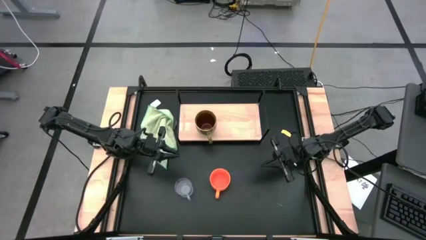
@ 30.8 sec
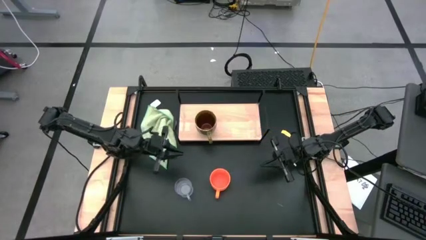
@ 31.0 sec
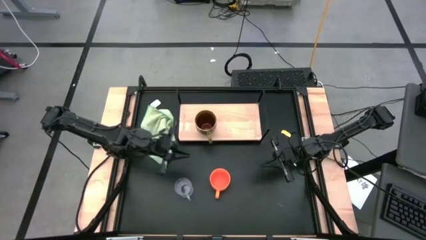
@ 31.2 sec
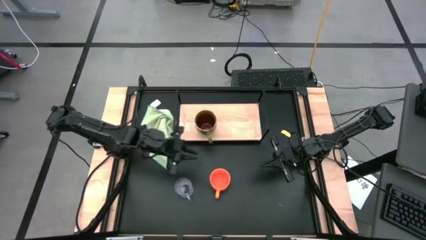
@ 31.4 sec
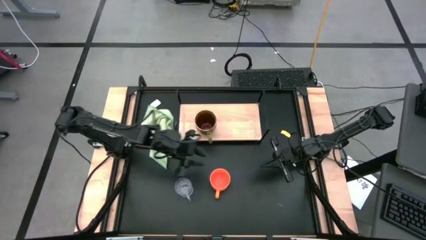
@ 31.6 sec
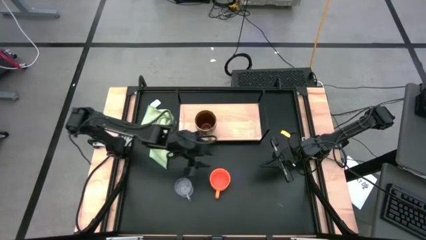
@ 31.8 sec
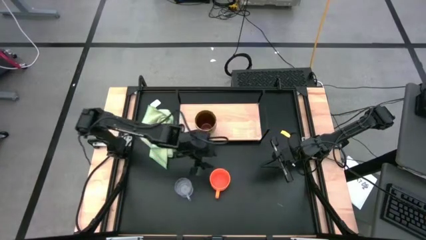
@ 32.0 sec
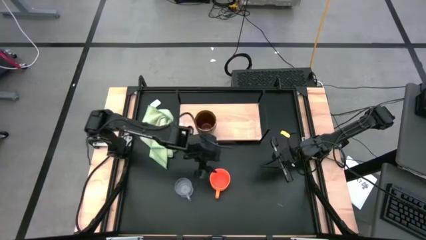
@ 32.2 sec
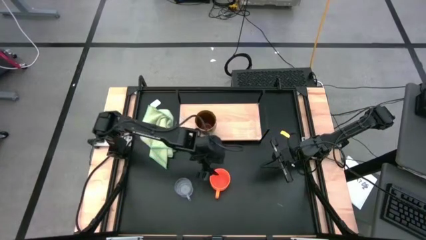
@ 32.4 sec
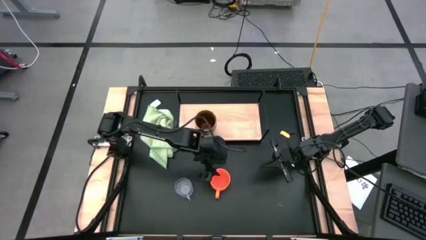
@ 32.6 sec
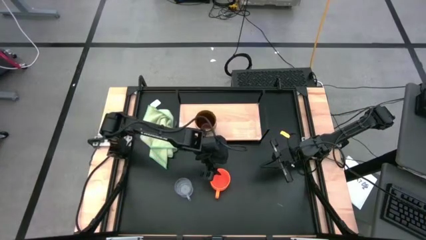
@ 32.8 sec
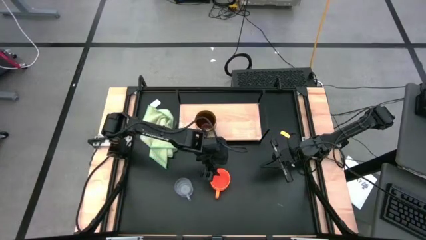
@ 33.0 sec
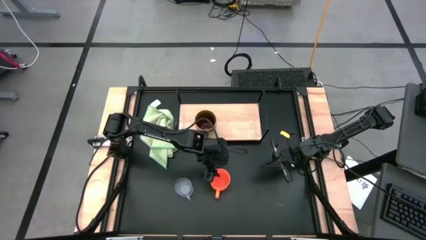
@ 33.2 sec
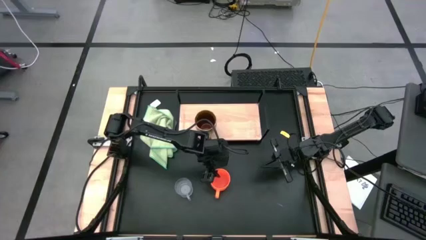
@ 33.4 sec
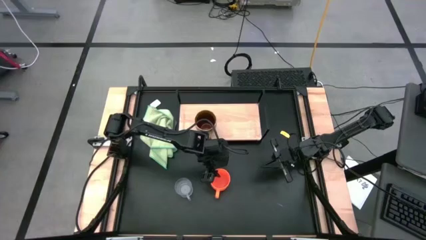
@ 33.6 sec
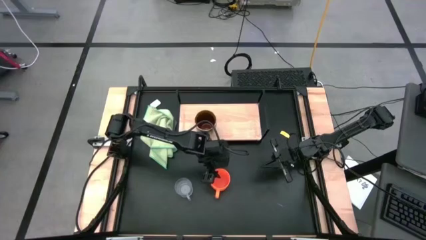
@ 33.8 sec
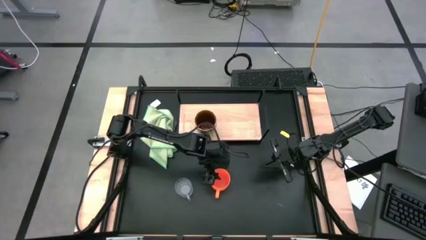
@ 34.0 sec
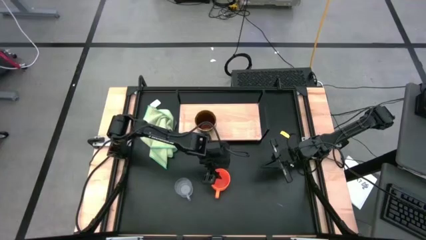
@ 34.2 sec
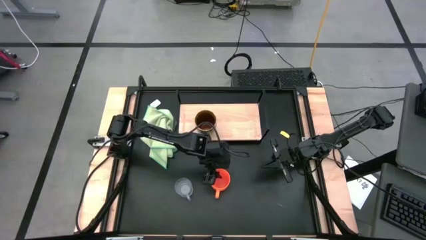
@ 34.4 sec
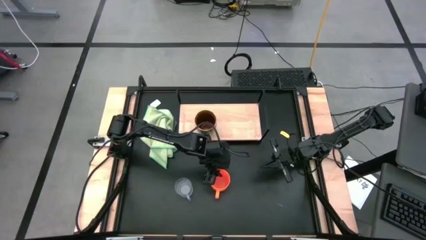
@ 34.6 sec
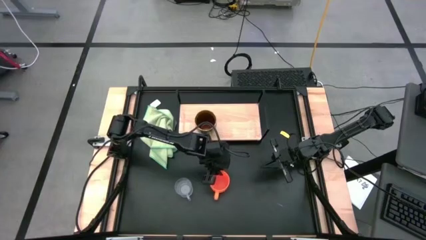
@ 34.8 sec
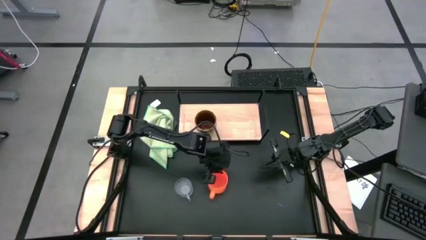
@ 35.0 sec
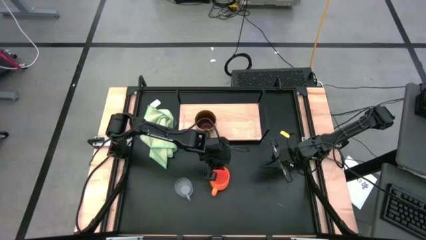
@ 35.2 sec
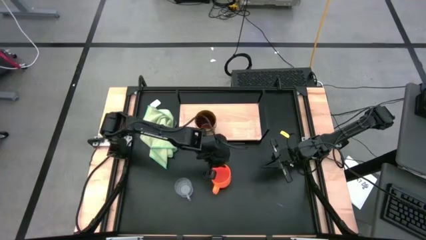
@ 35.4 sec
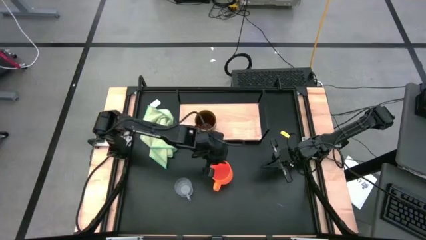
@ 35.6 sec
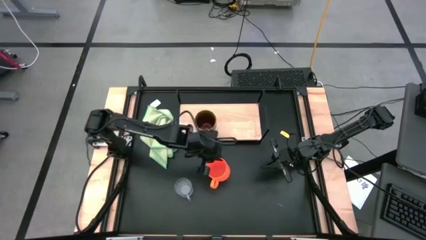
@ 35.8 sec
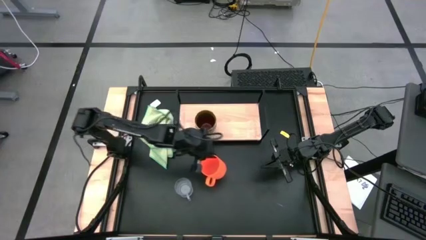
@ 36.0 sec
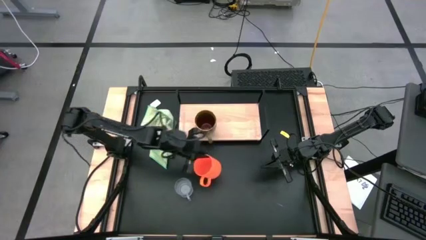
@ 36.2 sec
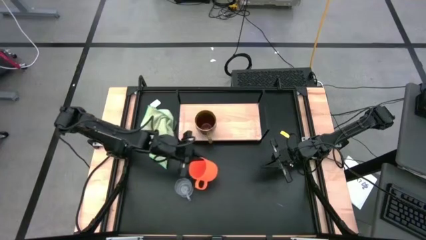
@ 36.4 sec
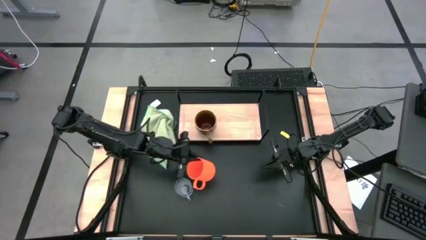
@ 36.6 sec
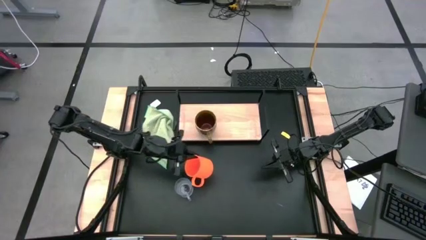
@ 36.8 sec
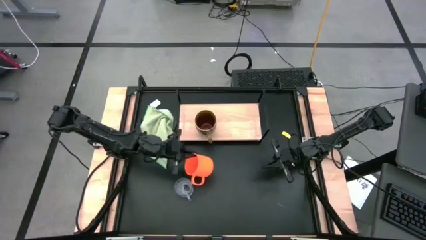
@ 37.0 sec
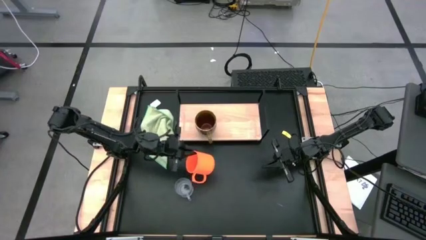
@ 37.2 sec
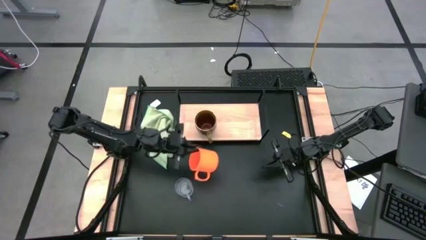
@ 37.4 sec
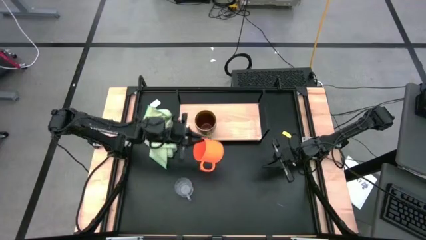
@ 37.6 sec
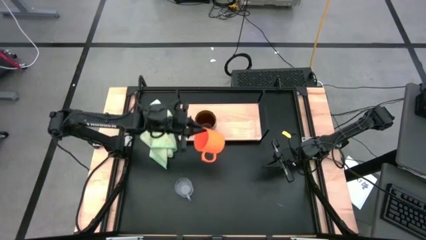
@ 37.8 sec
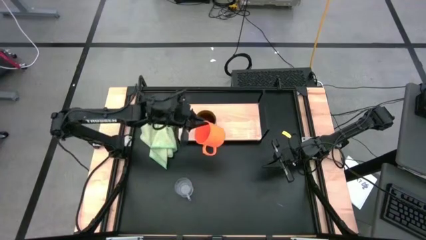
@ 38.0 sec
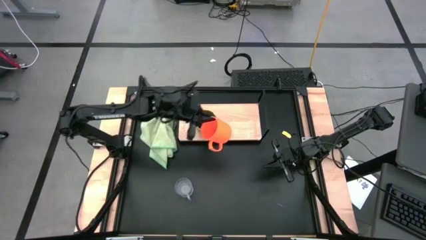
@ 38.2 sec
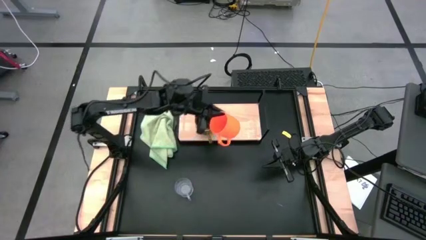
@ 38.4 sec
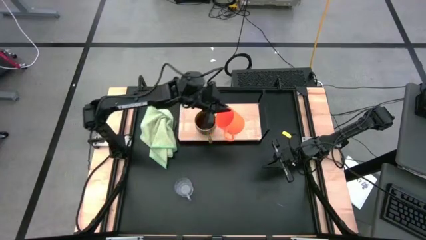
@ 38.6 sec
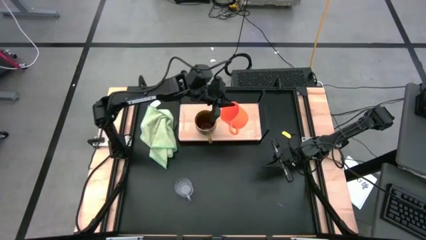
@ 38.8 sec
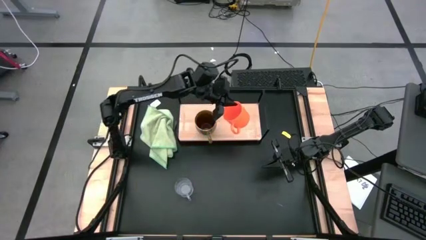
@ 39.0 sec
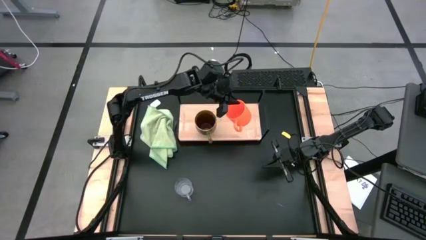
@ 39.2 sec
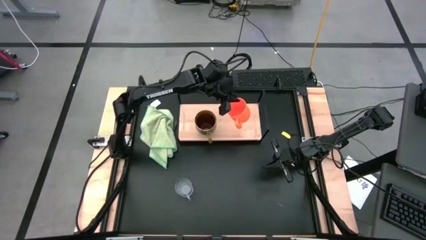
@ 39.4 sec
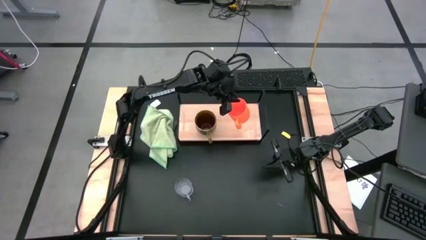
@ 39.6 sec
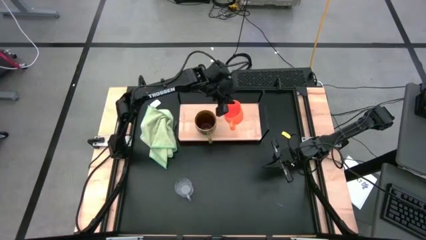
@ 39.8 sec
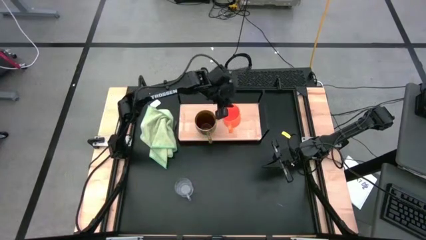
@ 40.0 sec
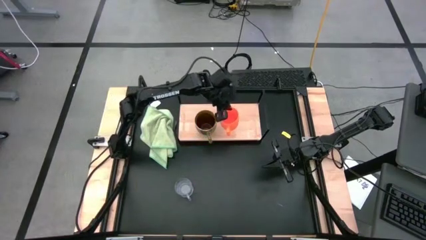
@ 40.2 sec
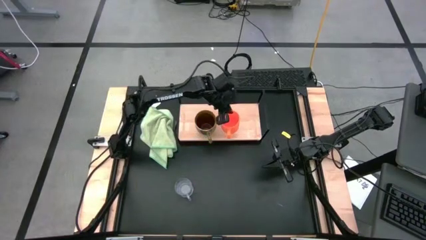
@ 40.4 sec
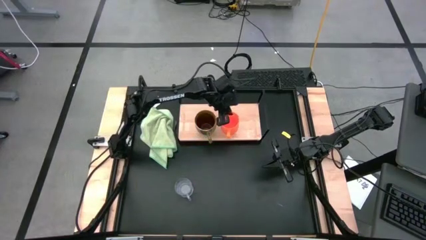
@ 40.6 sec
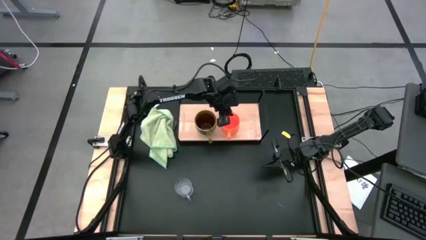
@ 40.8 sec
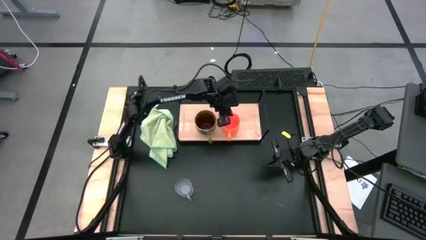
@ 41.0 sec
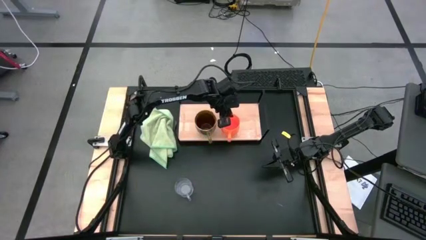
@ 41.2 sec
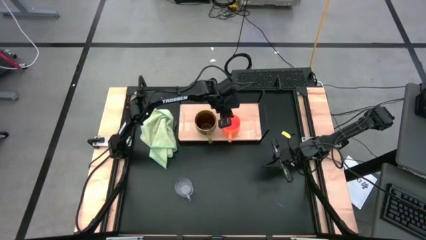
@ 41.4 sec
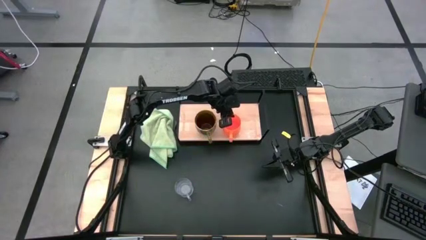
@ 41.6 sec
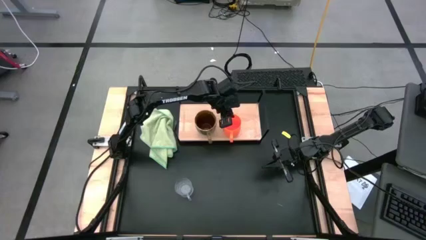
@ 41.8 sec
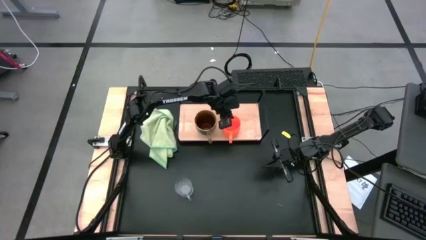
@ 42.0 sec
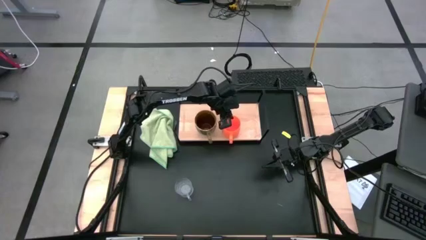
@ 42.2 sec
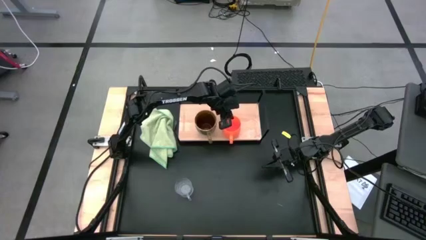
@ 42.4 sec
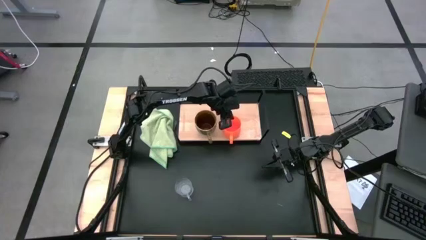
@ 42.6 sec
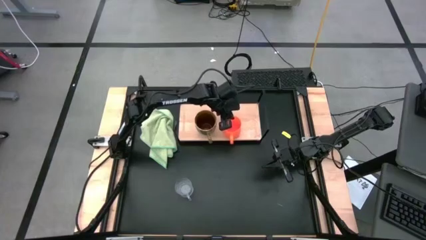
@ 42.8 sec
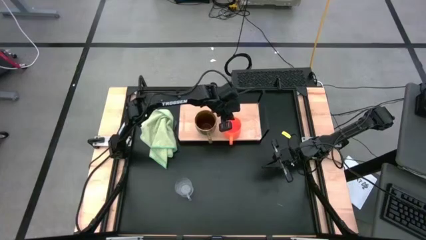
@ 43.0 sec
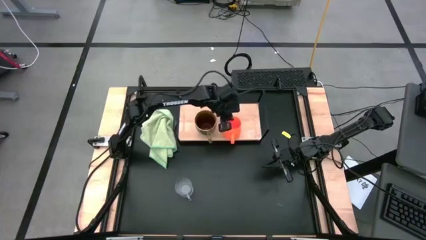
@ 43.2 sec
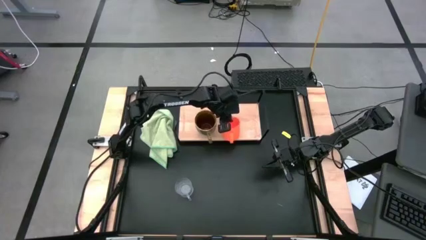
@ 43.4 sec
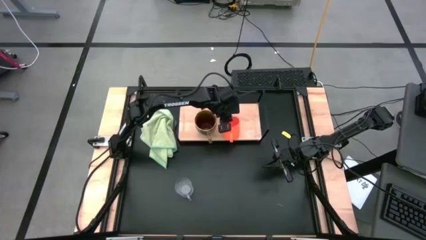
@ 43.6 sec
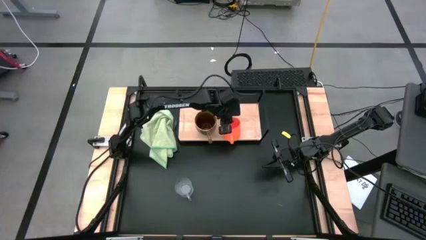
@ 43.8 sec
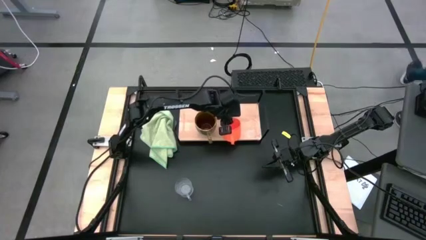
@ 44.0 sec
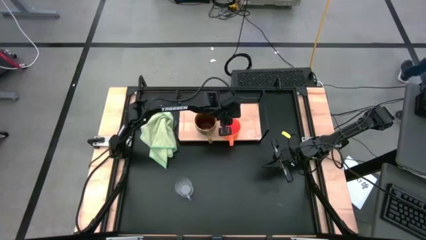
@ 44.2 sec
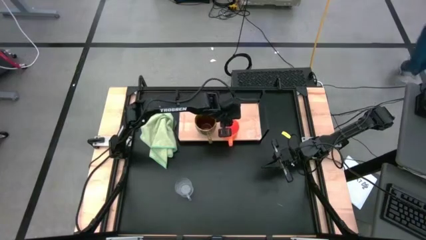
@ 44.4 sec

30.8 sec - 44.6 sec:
Task: Stack small to large cups/mugs on shelf
Put the orange mug to the right of the light green mug on the shelf
